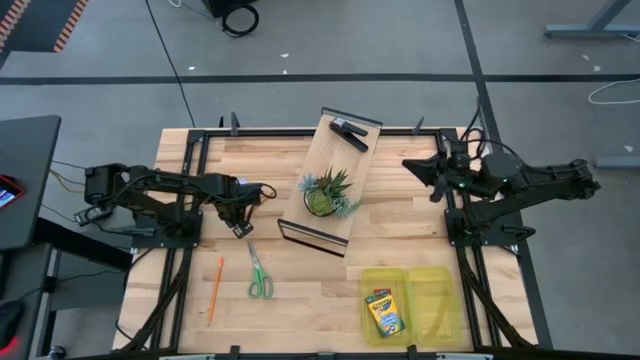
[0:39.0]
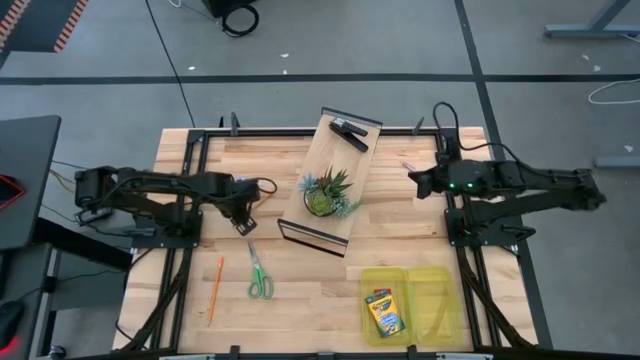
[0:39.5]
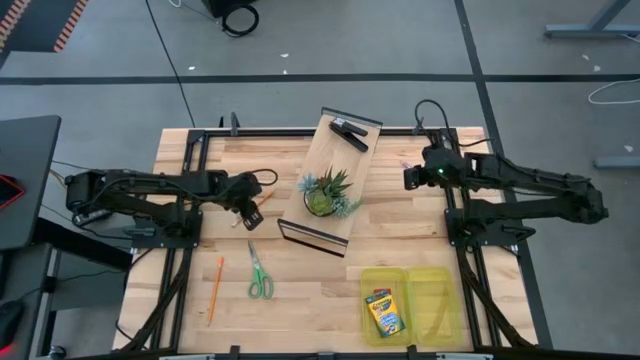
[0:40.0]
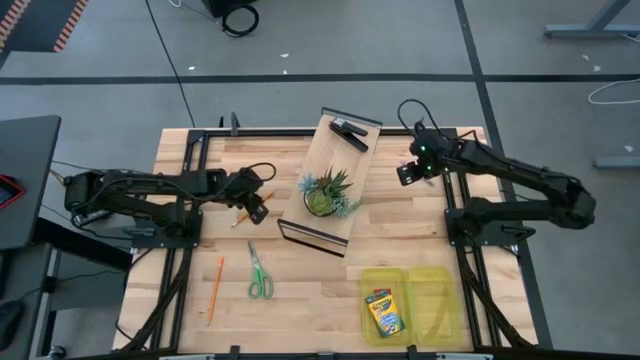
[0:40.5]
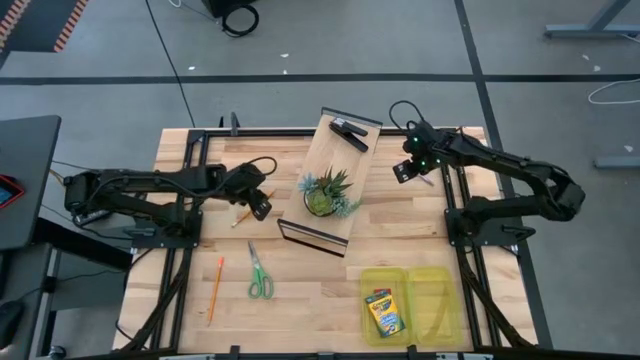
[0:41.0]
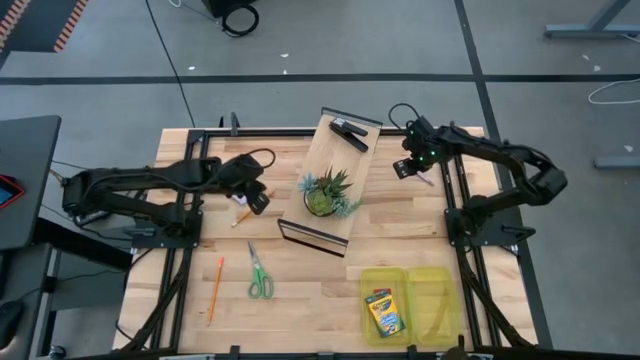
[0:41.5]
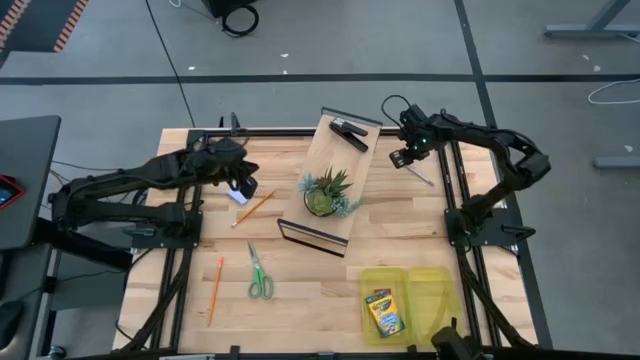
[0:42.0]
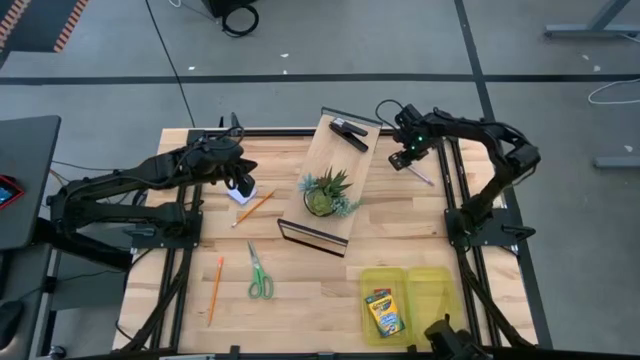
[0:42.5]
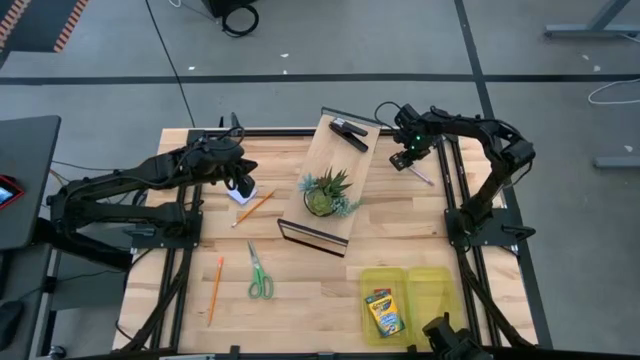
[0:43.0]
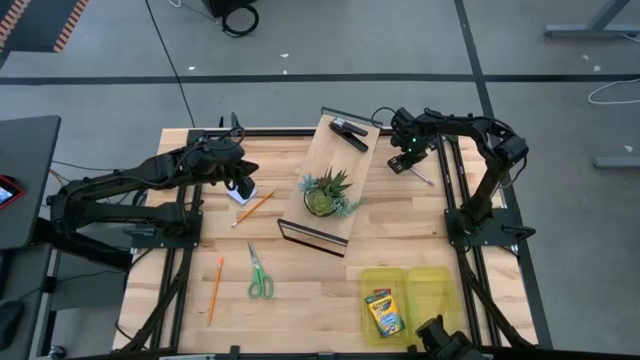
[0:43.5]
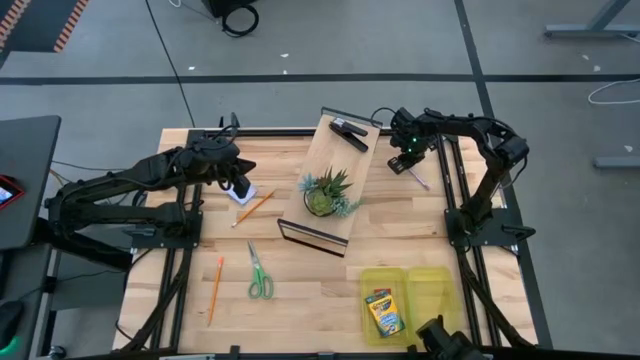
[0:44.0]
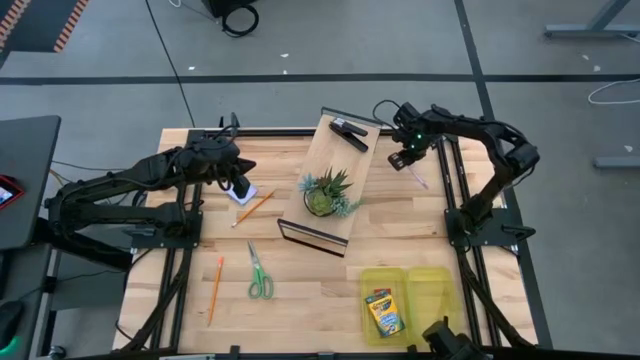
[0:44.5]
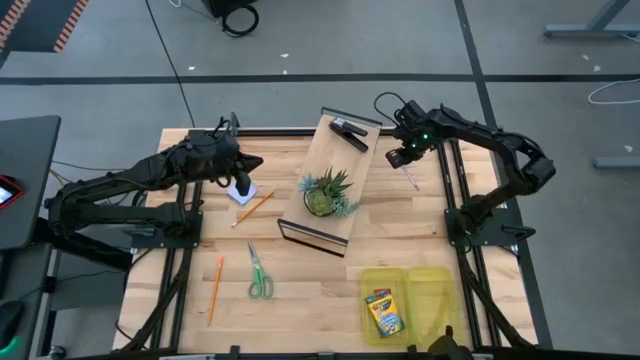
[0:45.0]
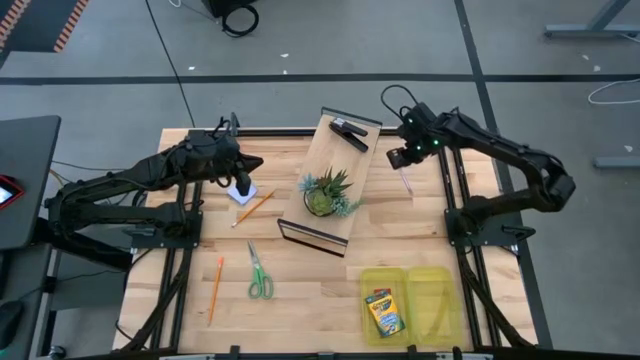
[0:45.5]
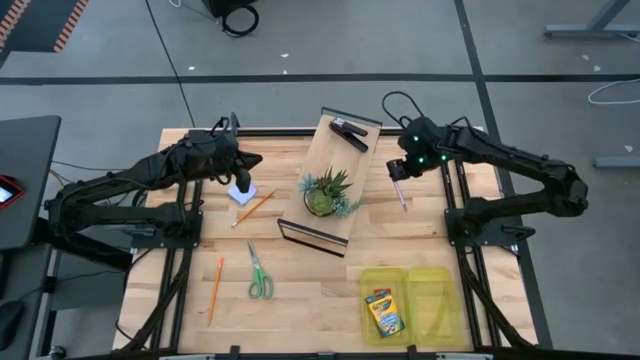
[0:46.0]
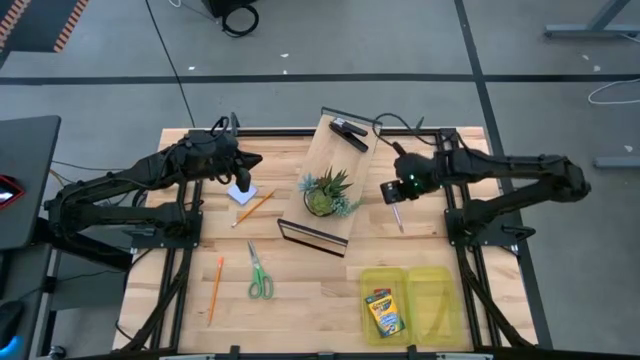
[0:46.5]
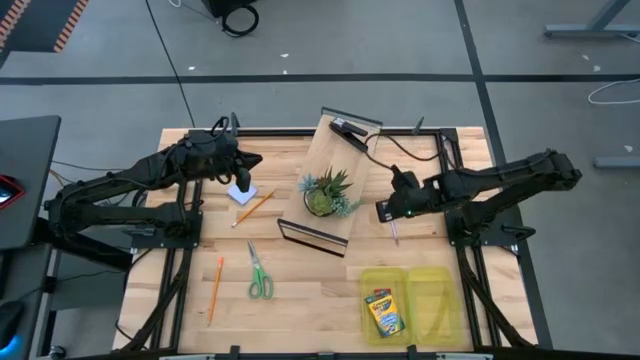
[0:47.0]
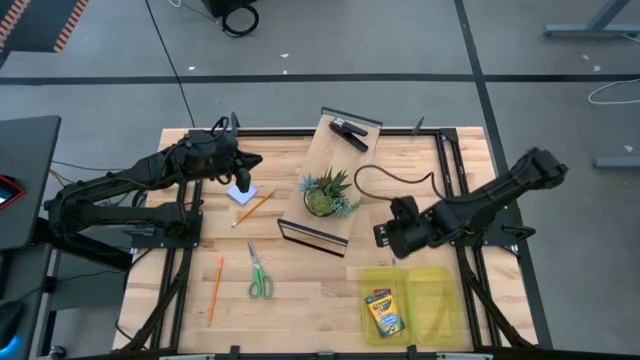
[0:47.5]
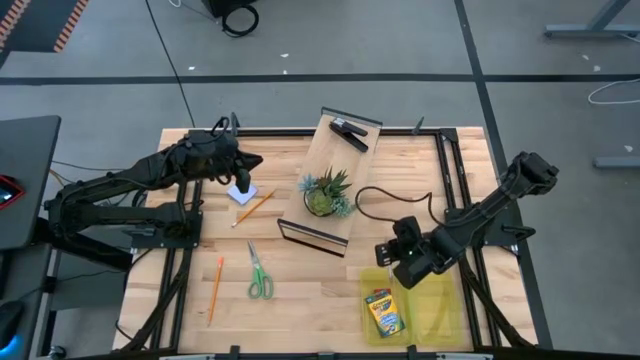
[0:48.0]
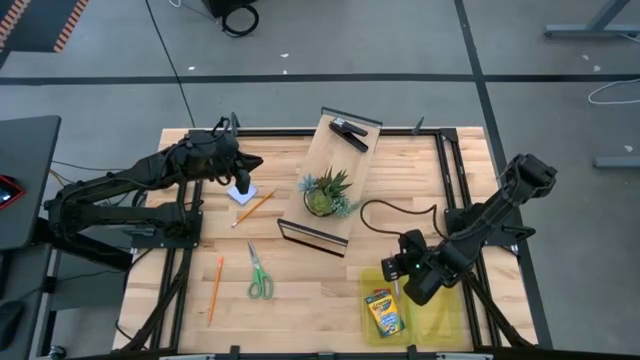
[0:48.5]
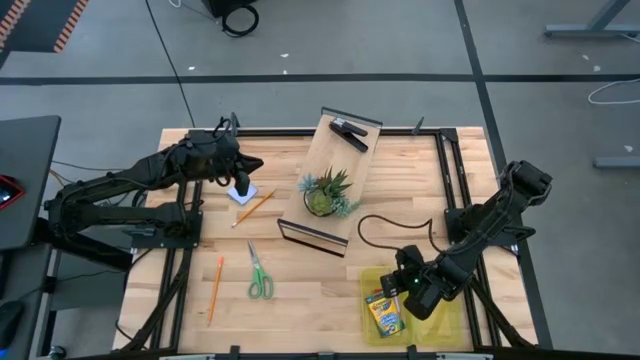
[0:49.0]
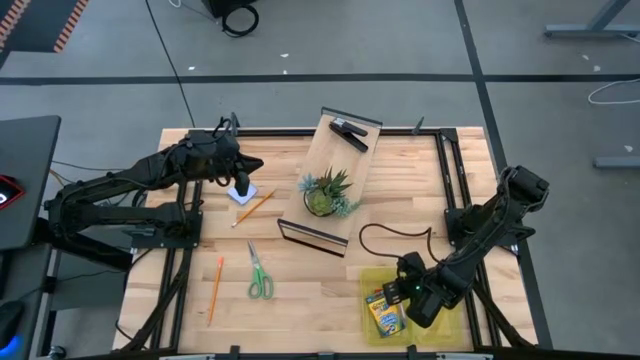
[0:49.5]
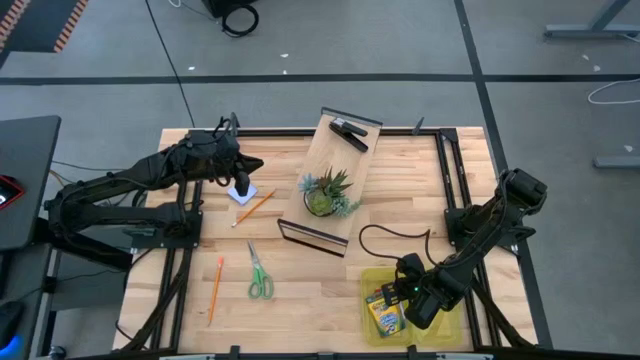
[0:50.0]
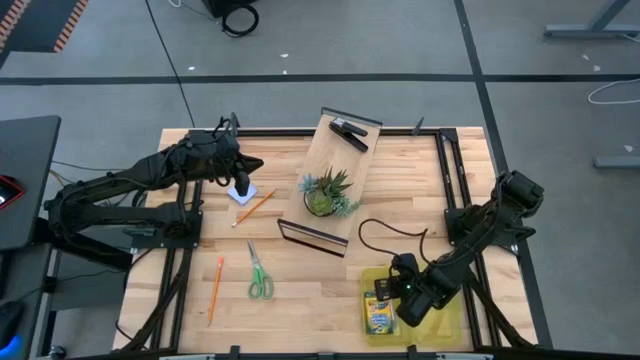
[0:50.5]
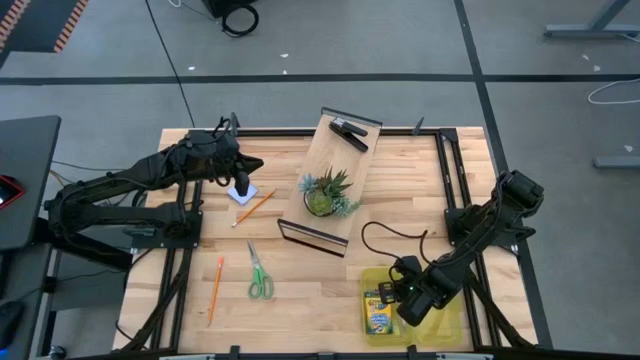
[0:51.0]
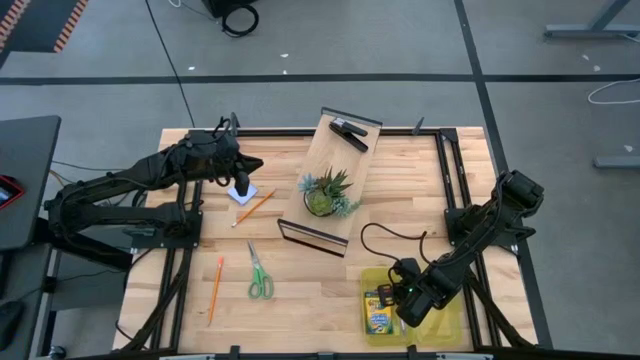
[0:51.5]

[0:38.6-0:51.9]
Task: Pack school essentials
Put the violet pen into the yellow supply box

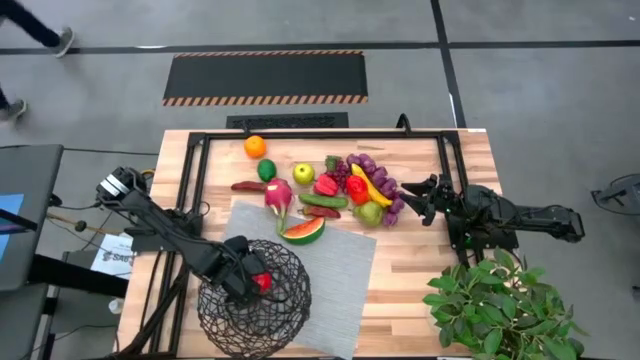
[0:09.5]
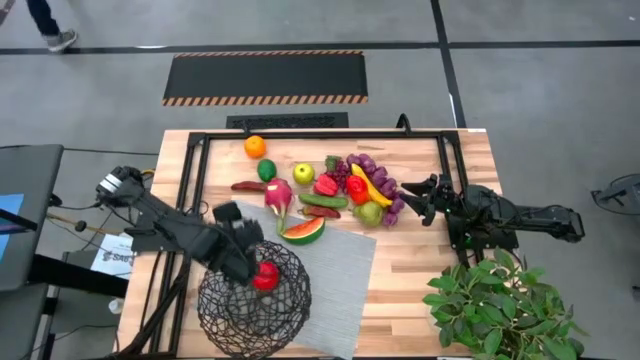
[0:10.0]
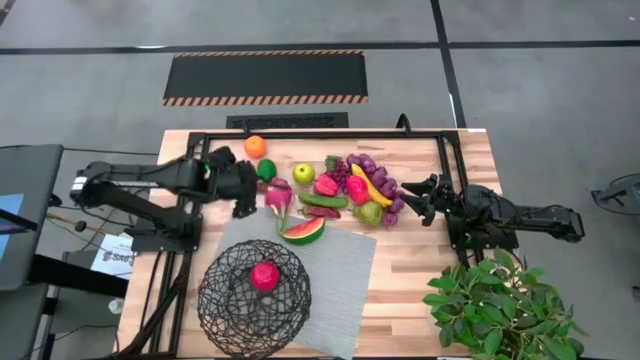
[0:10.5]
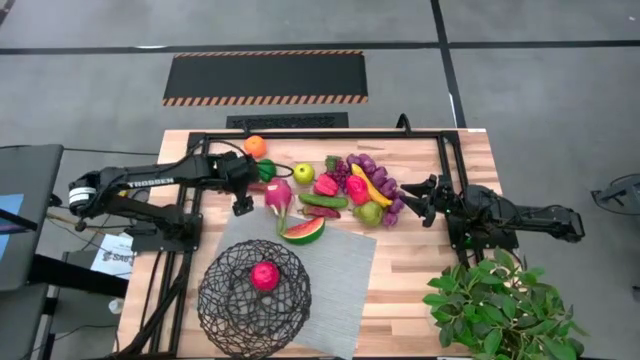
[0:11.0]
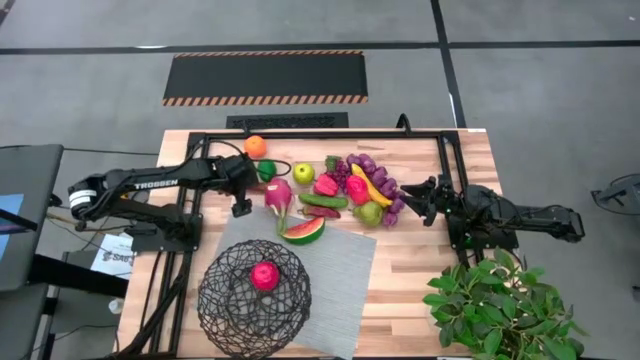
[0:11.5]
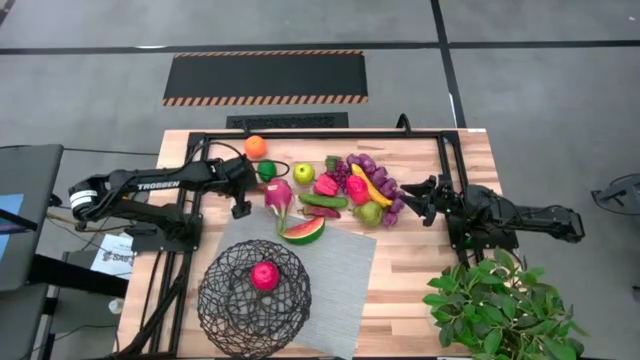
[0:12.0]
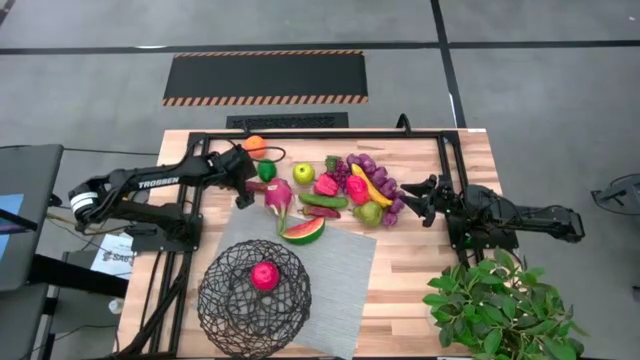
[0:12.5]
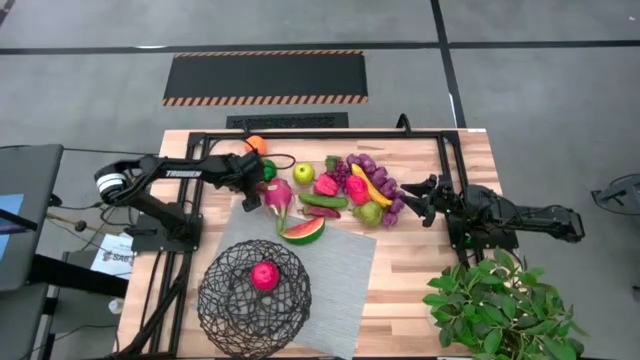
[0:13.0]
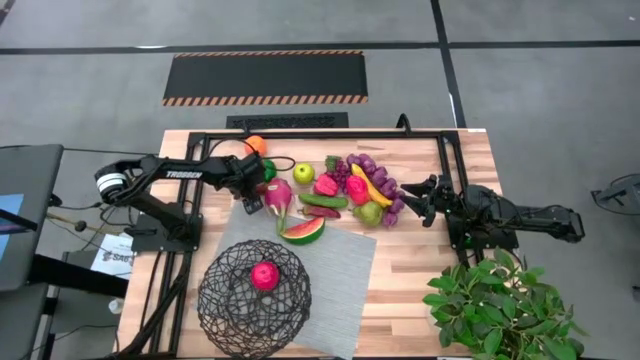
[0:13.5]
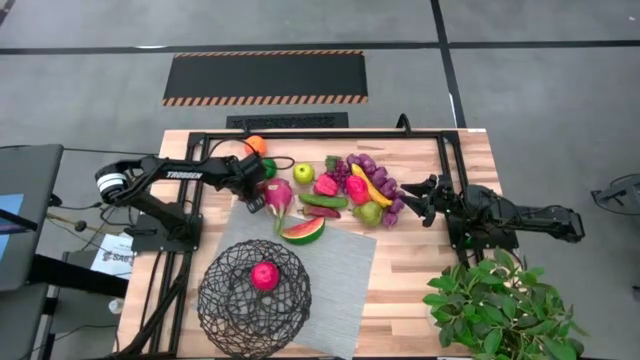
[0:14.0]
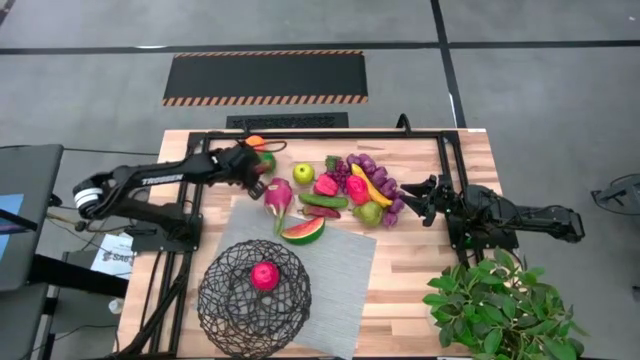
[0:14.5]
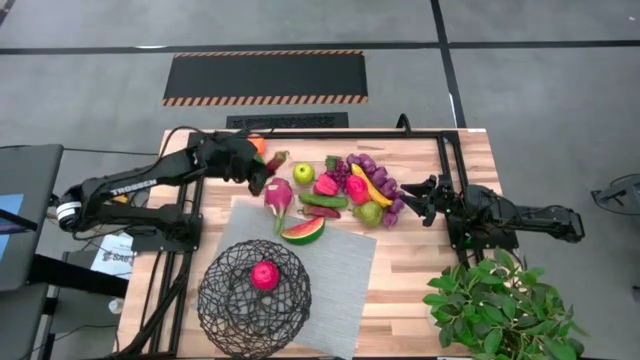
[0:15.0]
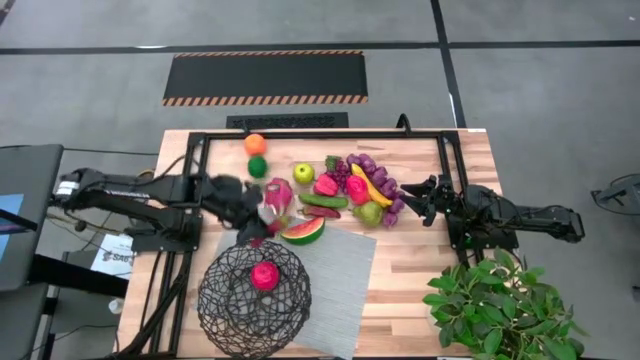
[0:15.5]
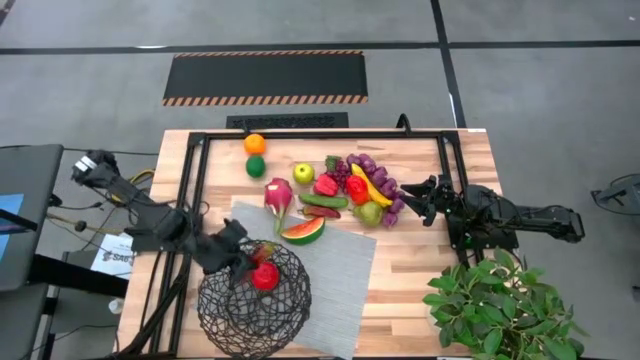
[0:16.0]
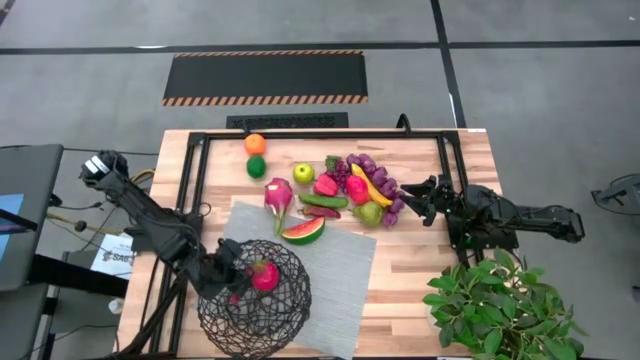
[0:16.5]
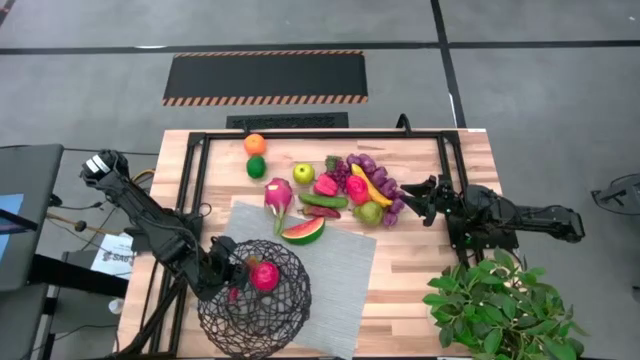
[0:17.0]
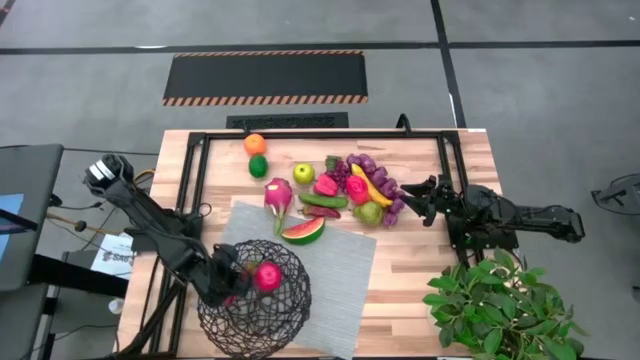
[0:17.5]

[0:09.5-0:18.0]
Task: Build produce basket
Put the top red chili pepper into the mesh basket
